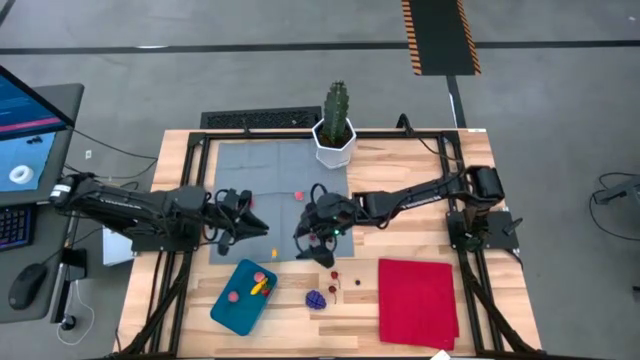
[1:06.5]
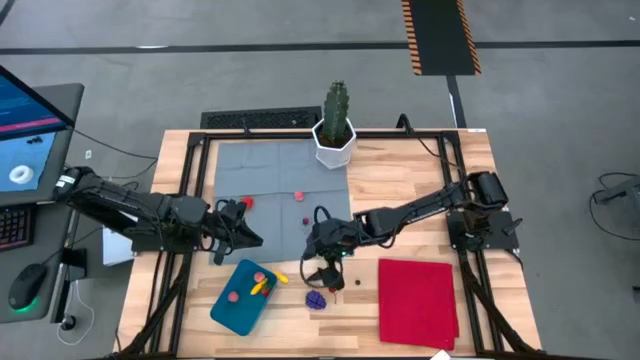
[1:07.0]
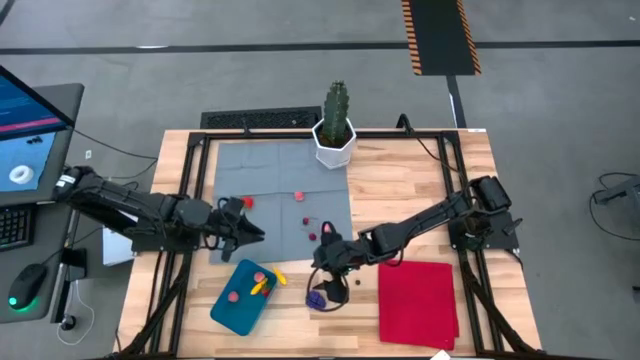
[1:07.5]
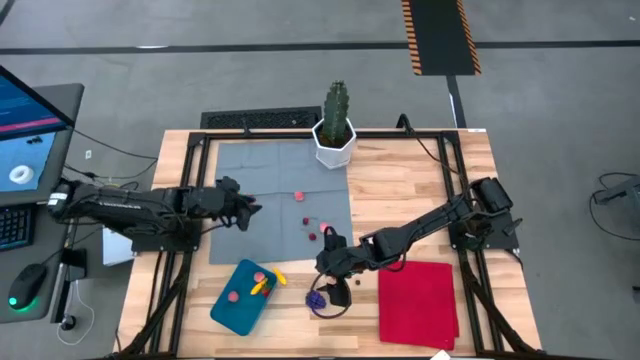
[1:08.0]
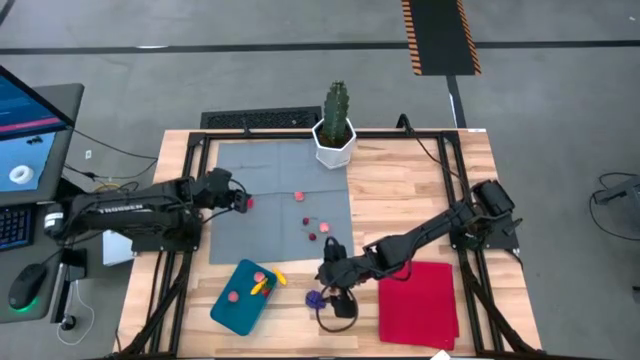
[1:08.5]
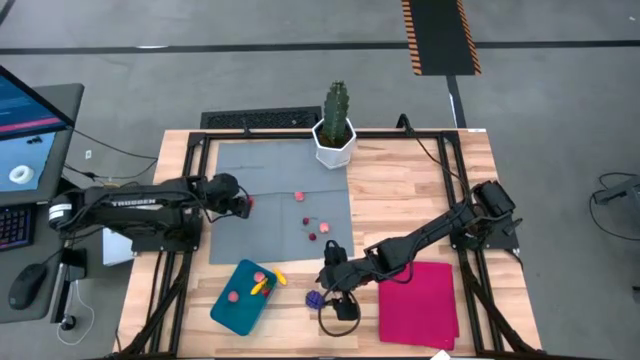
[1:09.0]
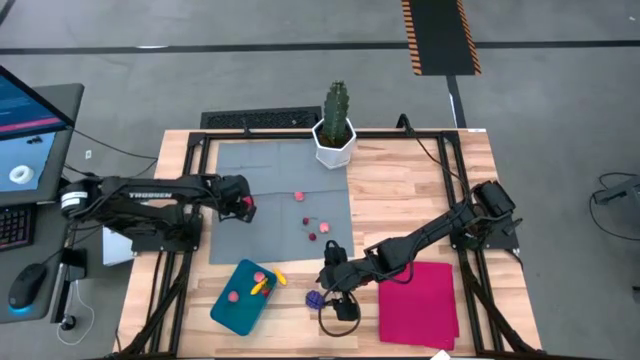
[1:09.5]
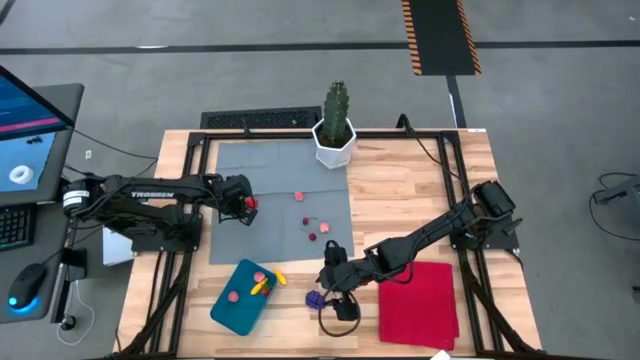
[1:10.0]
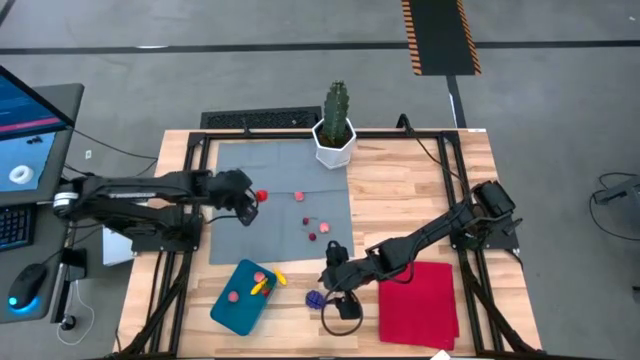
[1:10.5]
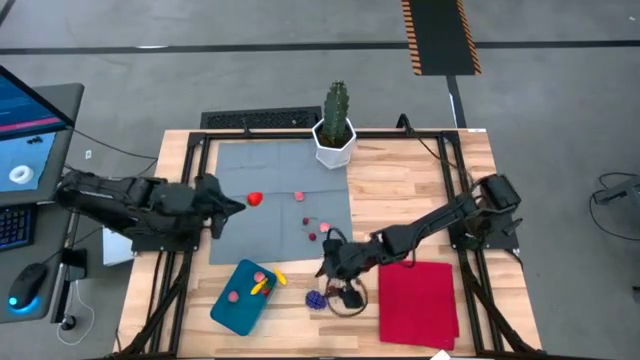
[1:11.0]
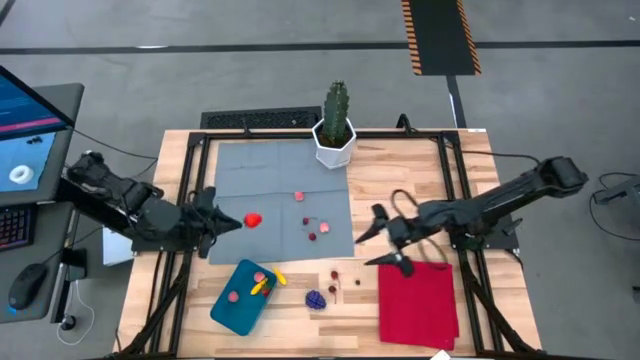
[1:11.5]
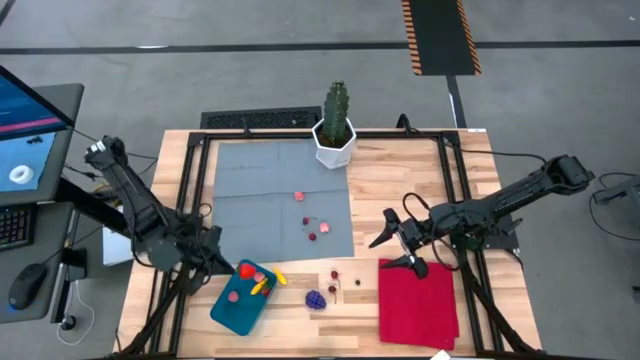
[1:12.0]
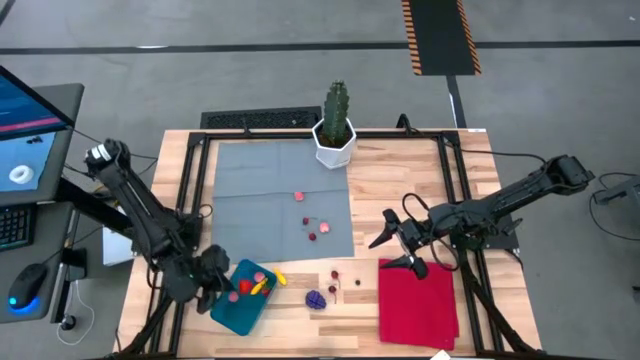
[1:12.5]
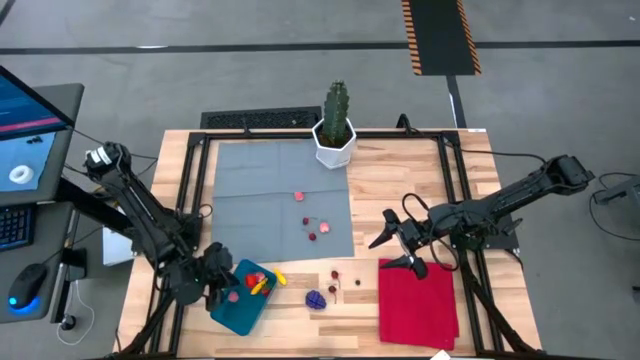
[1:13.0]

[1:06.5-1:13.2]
Task: Pick and placing Produce into tupperware
Put the strawberry into the blue bin

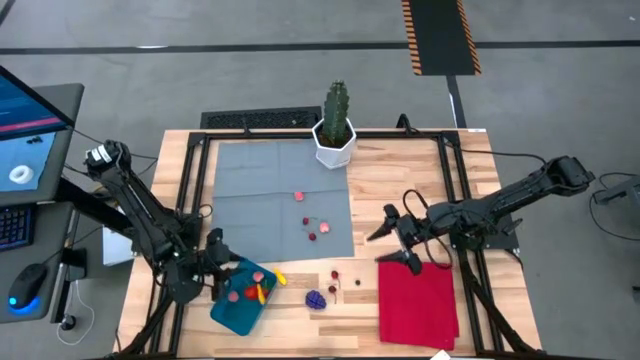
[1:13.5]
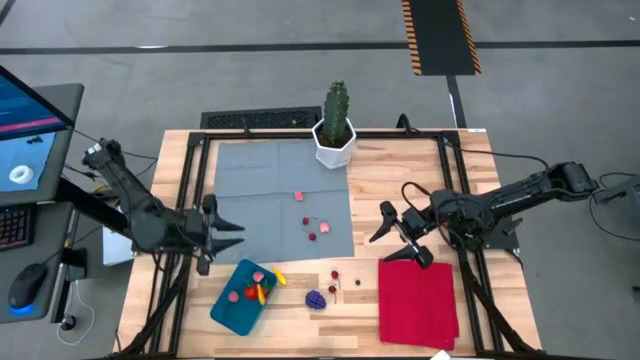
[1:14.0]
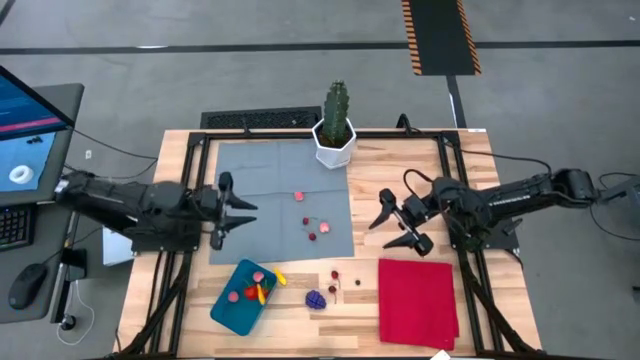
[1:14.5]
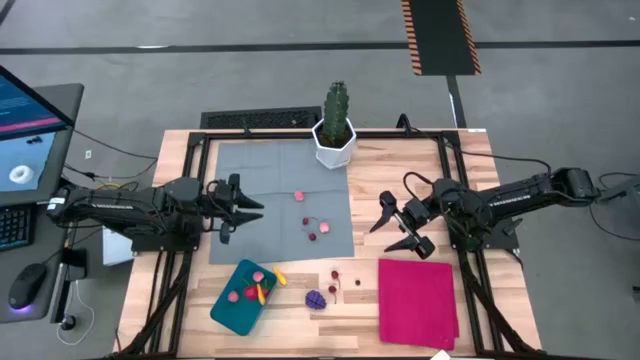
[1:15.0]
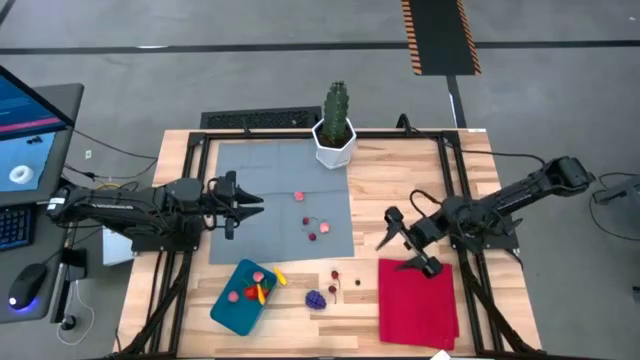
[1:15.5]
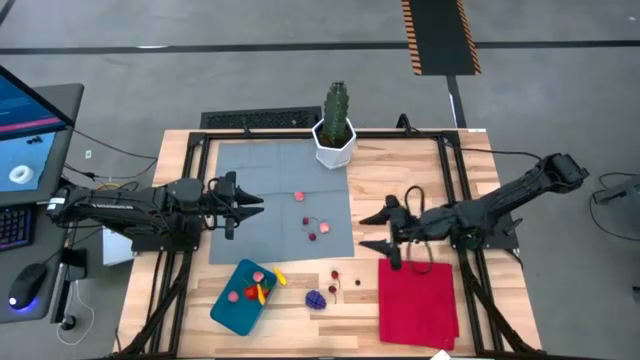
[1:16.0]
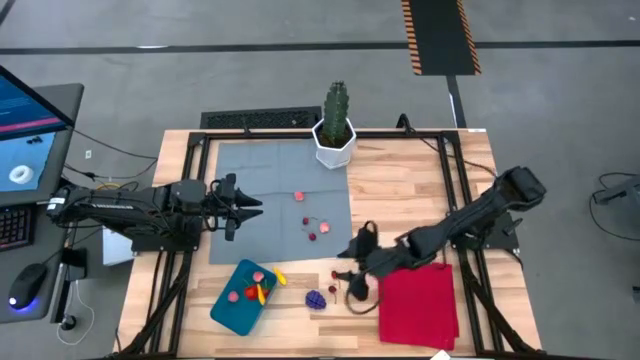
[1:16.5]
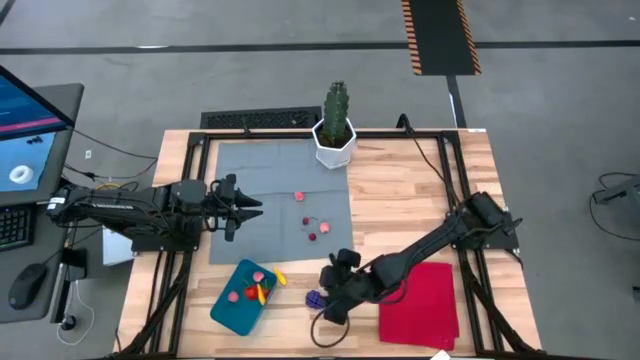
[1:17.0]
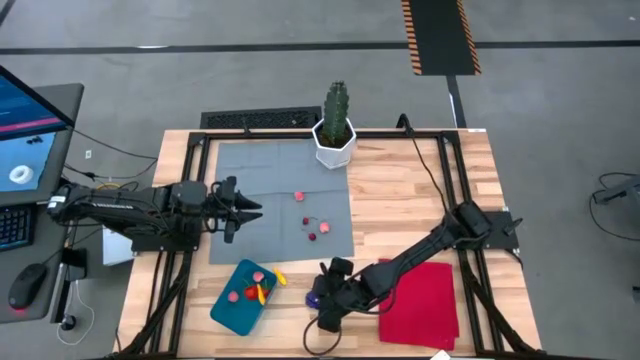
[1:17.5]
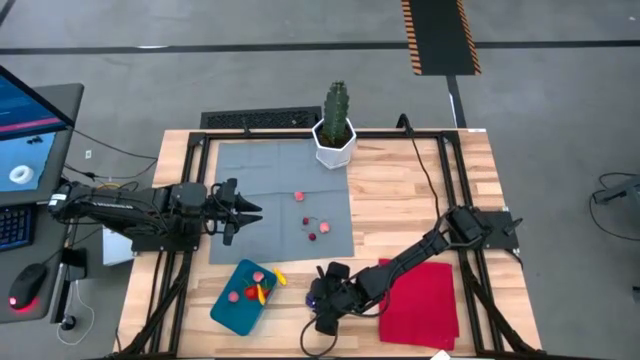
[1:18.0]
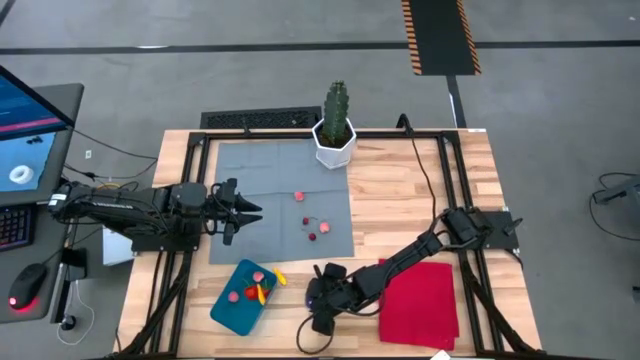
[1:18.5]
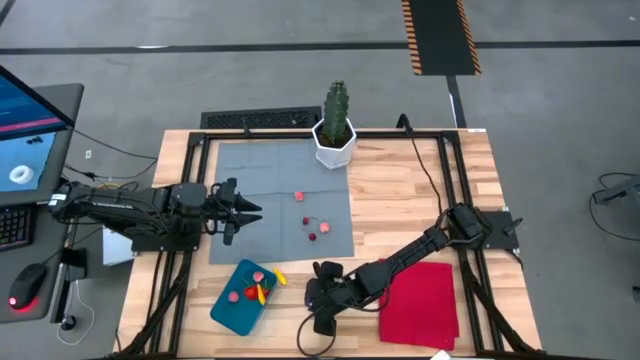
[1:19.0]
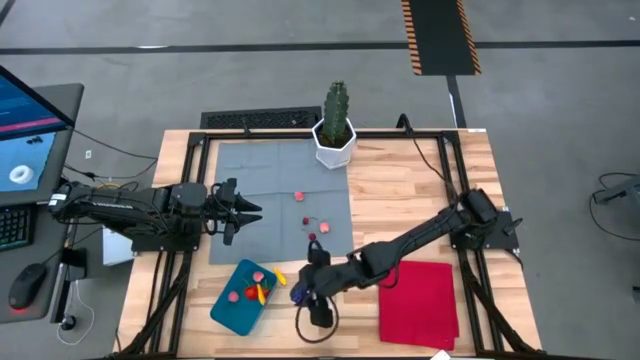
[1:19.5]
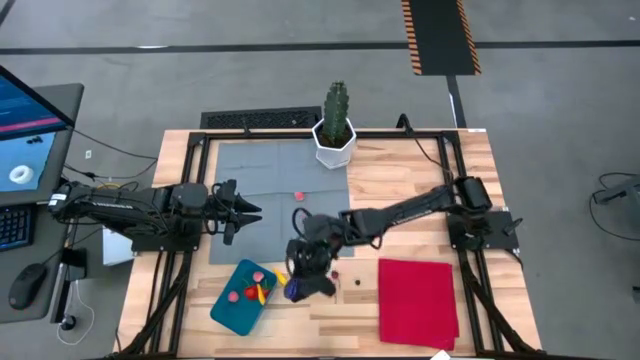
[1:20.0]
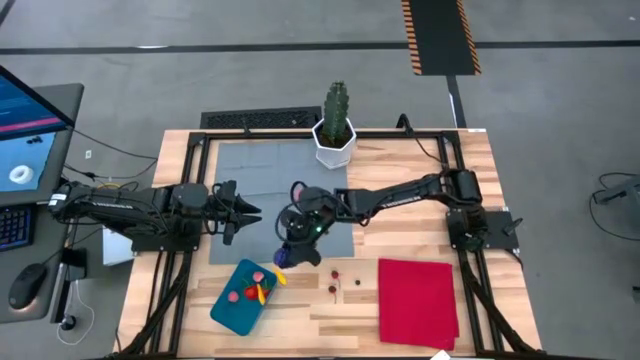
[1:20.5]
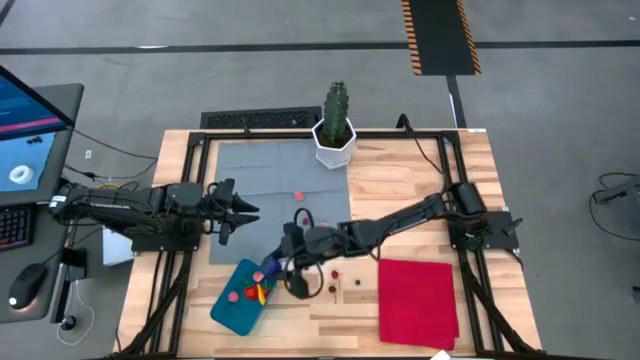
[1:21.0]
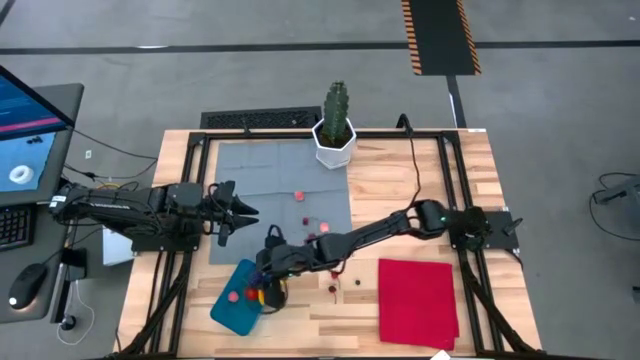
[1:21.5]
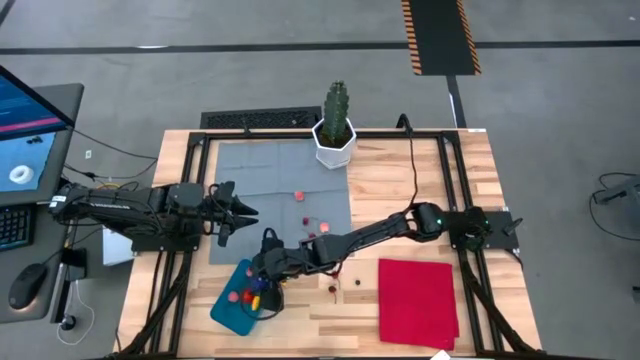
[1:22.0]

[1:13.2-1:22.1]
Put the grapes into the blue bin

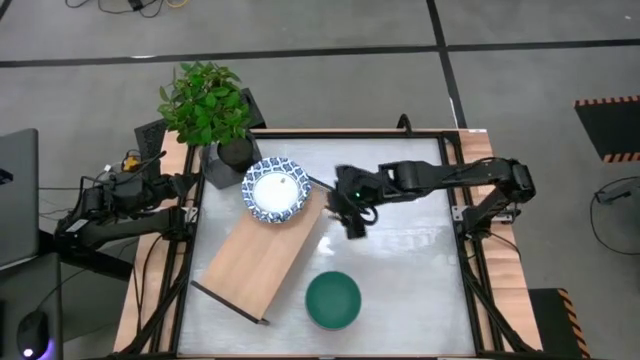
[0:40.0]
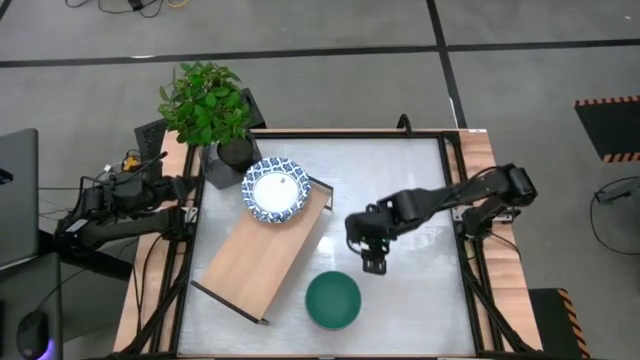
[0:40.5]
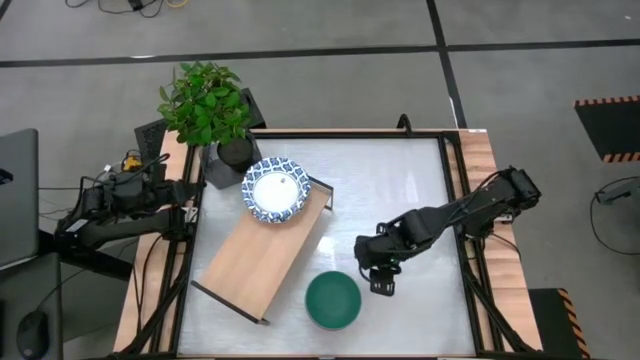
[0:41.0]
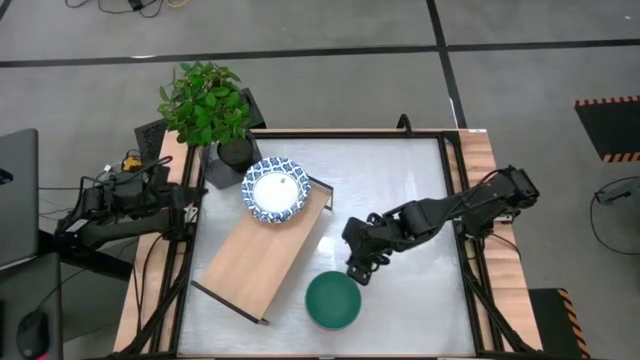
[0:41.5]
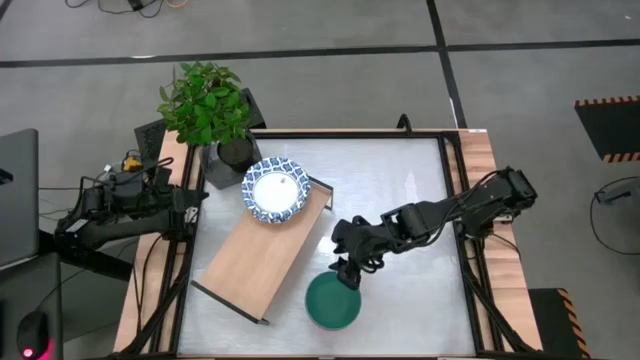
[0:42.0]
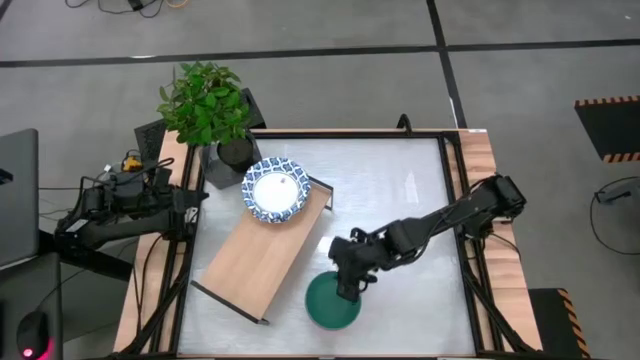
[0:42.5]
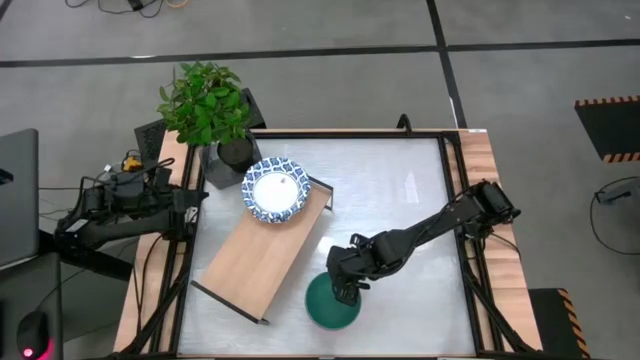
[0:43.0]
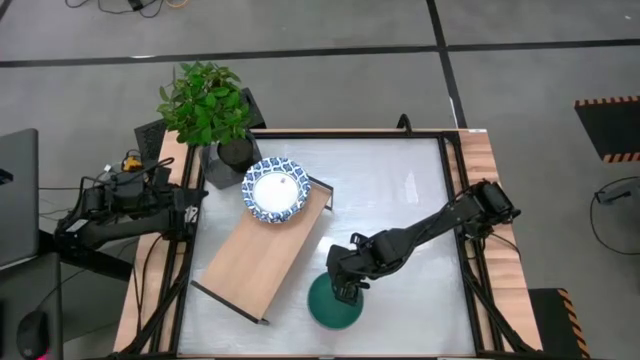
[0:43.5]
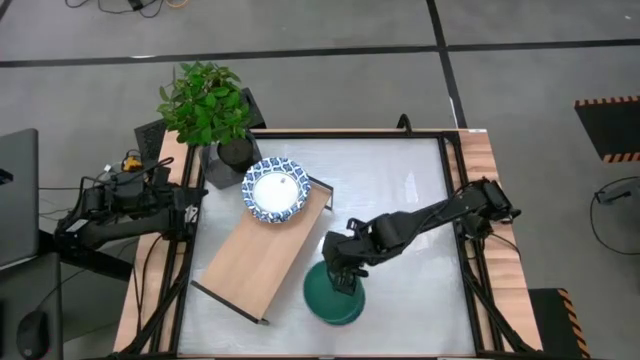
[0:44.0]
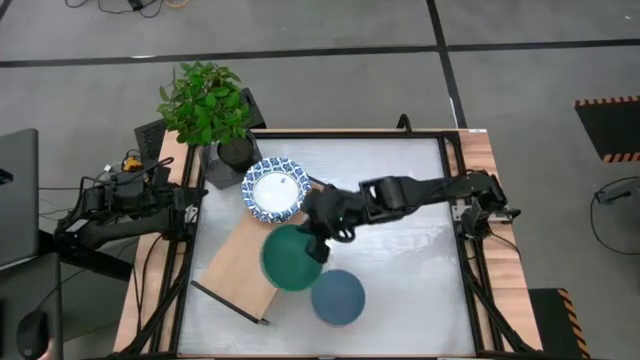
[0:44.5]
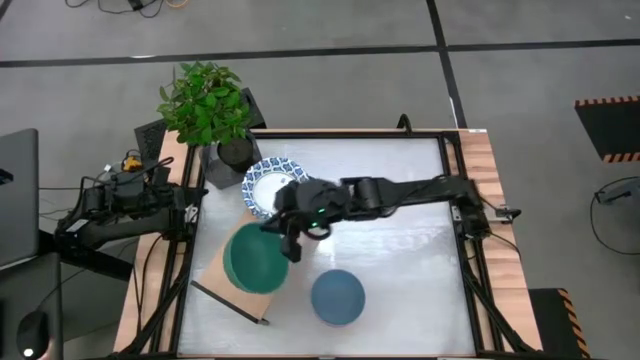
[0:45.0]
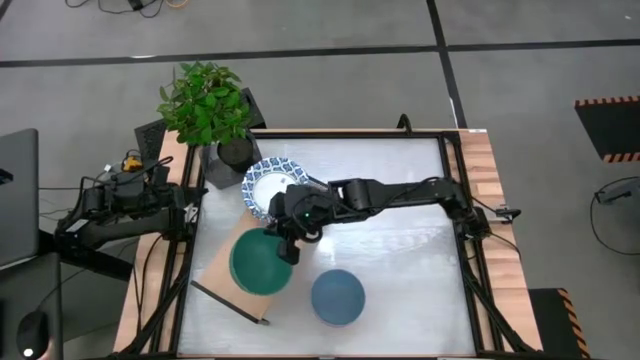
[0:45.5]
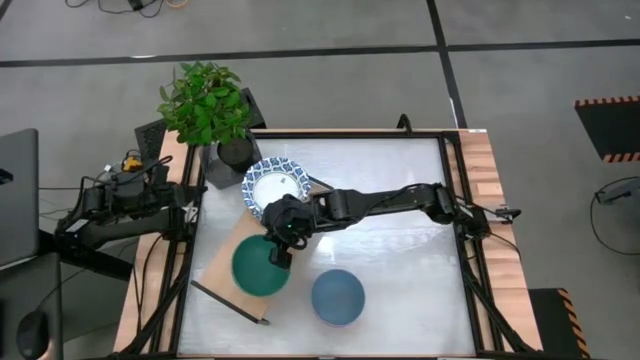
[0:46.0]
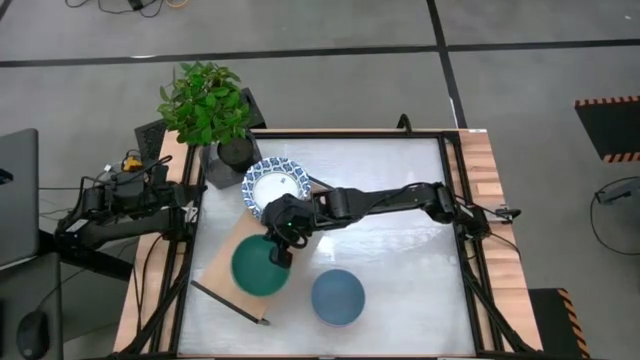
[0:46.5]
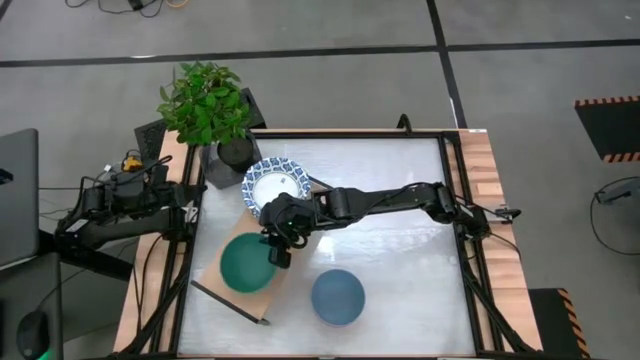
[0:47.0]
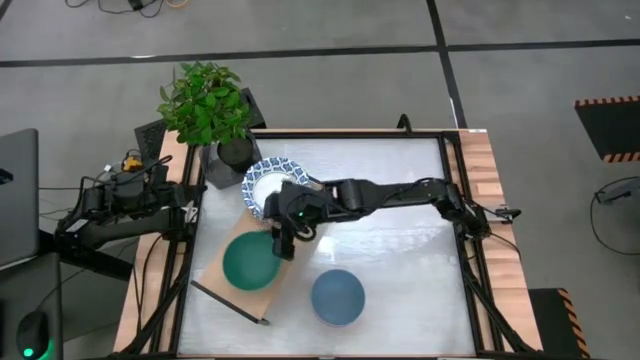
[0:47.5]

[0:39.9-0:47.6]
Task: Place and stack bowls onto a shelf
Put the green bowl on the shelf
